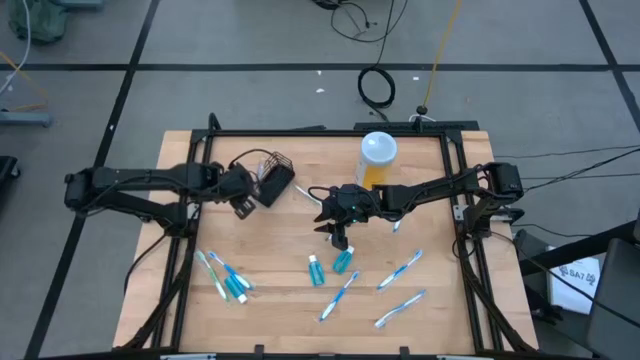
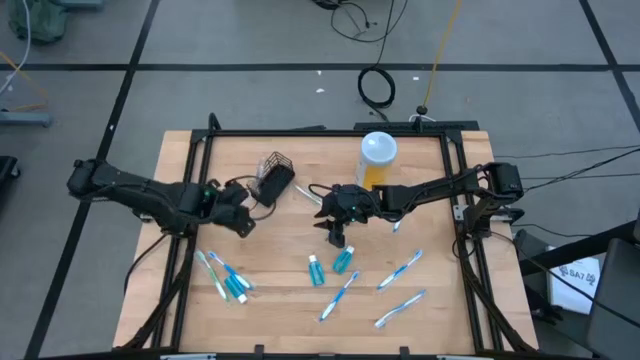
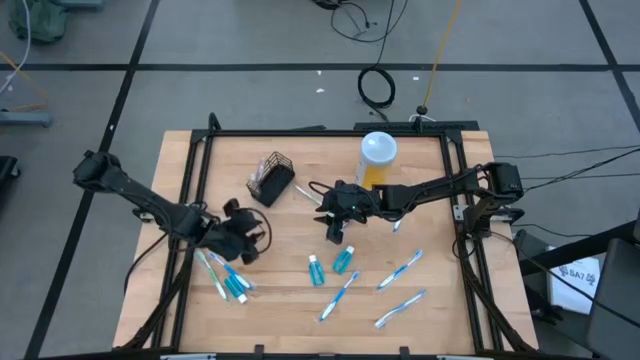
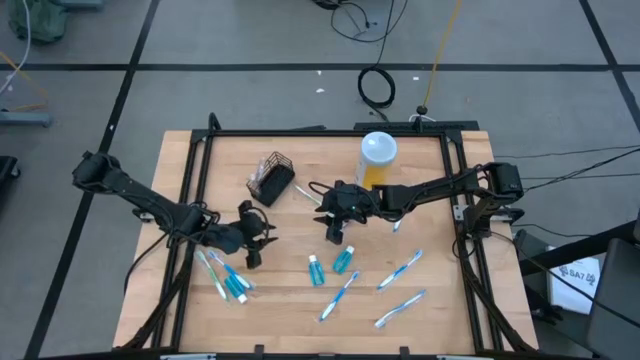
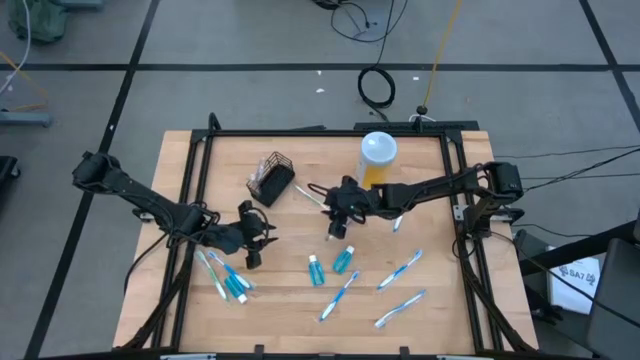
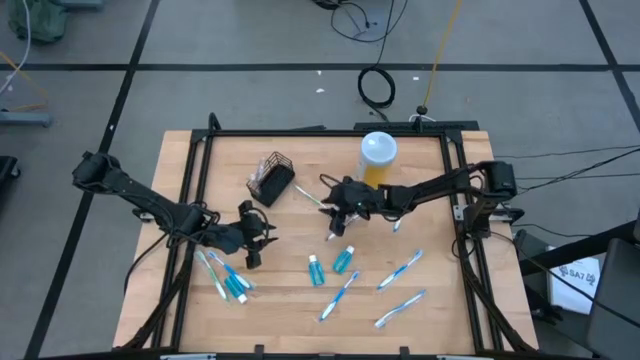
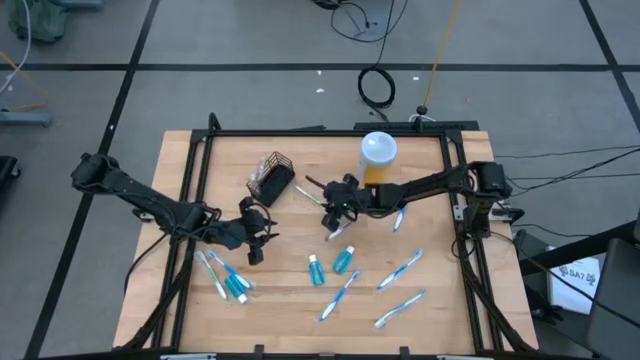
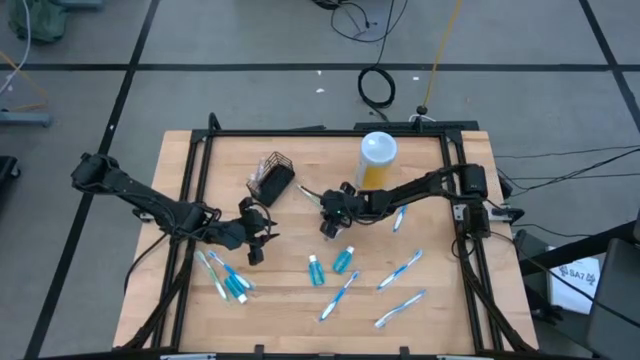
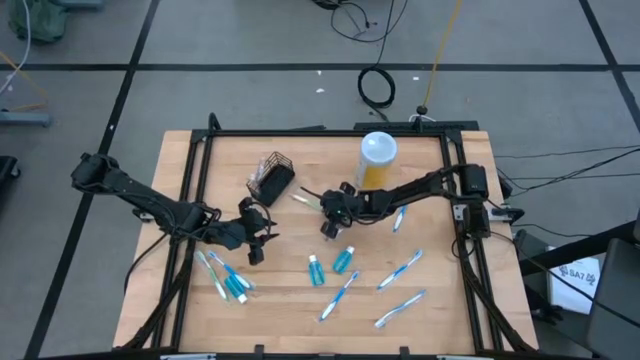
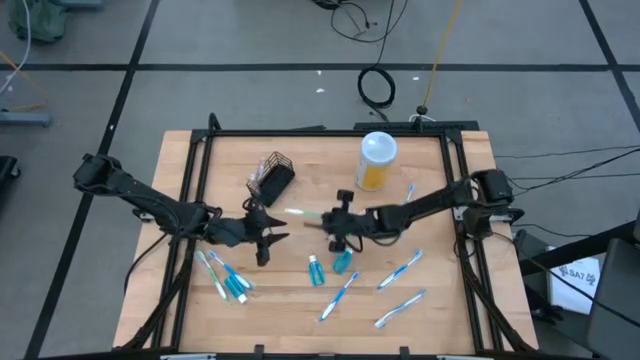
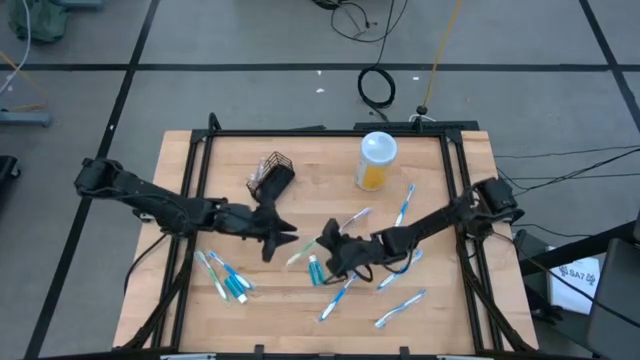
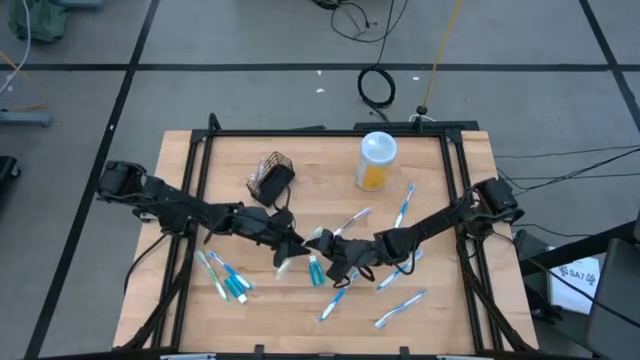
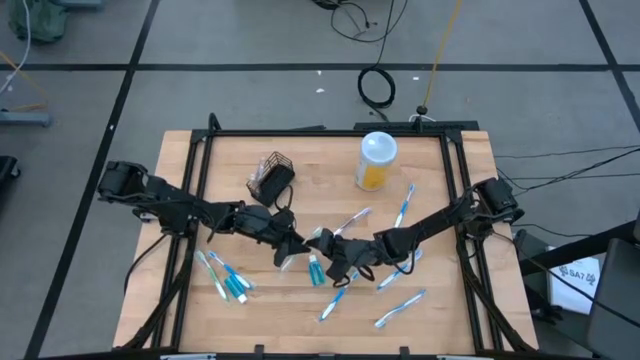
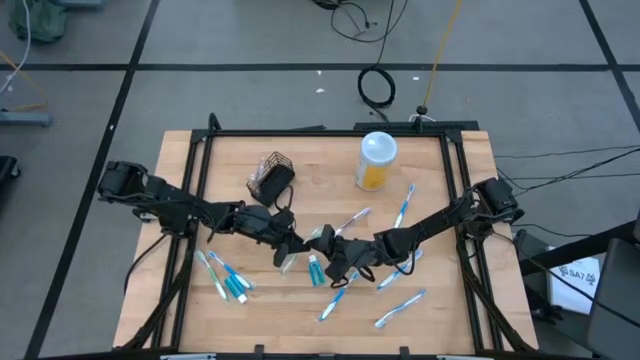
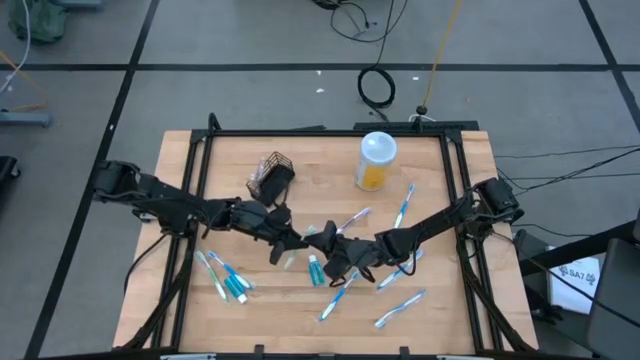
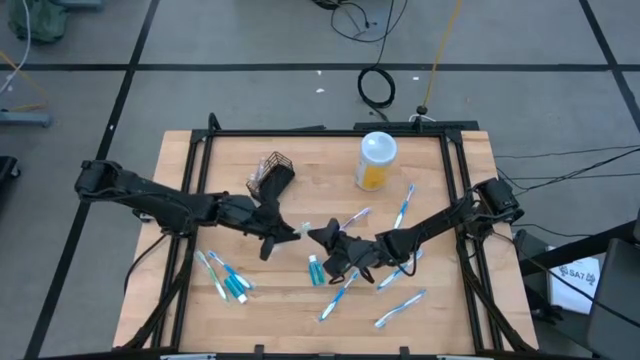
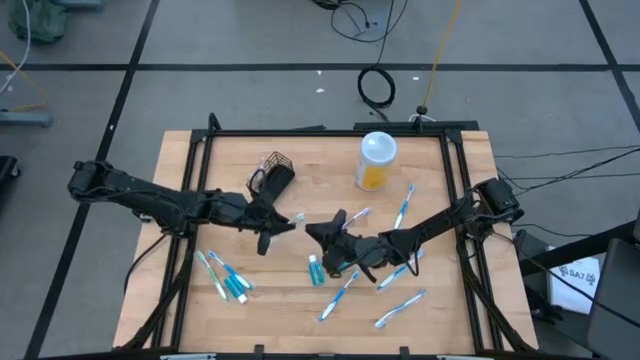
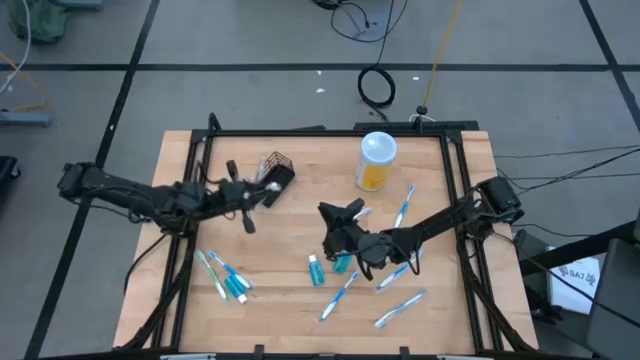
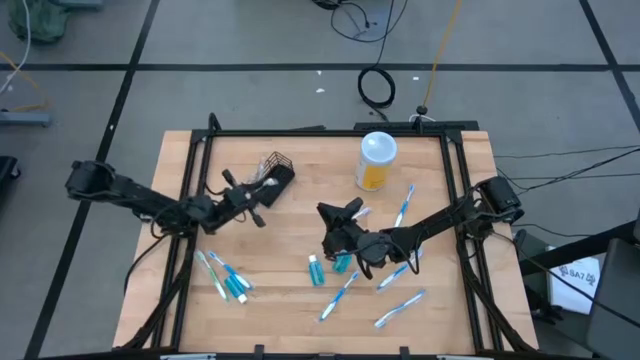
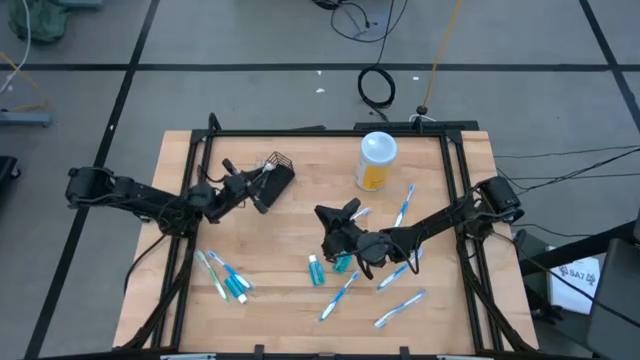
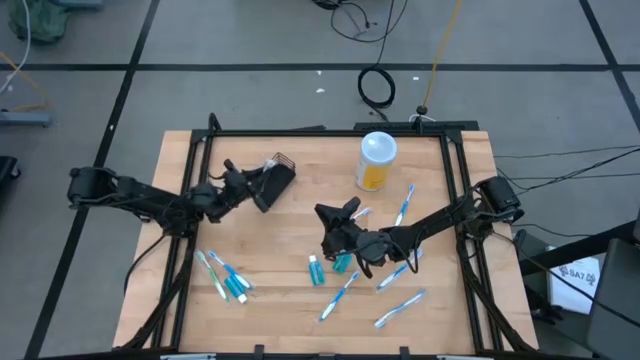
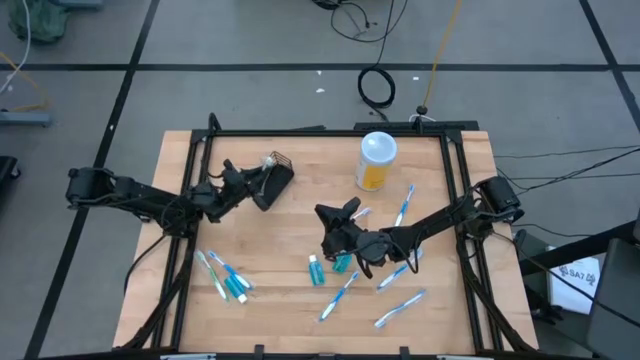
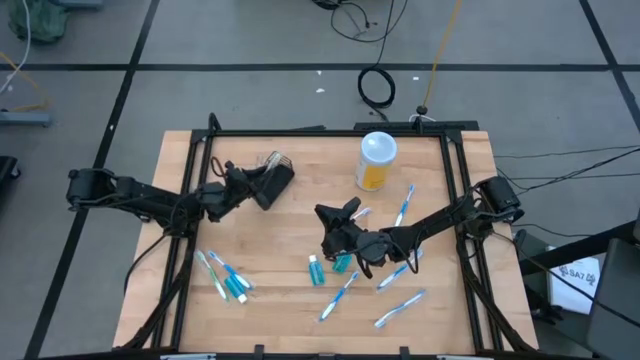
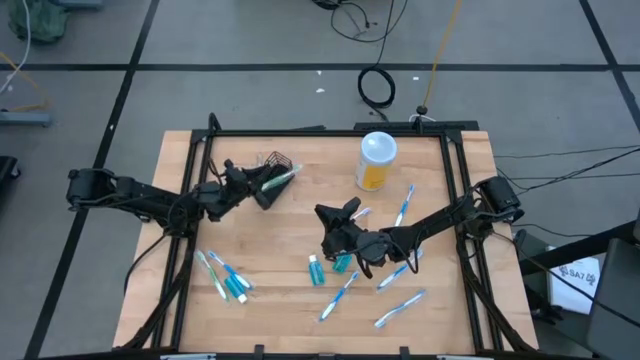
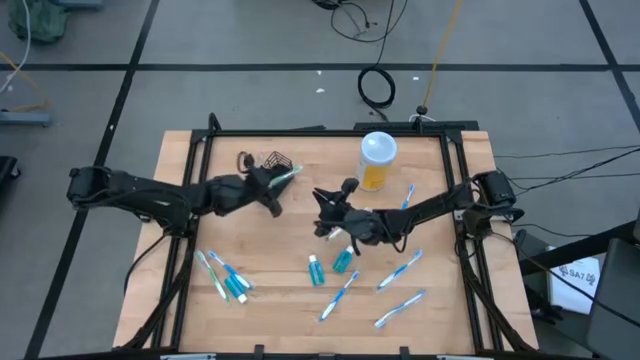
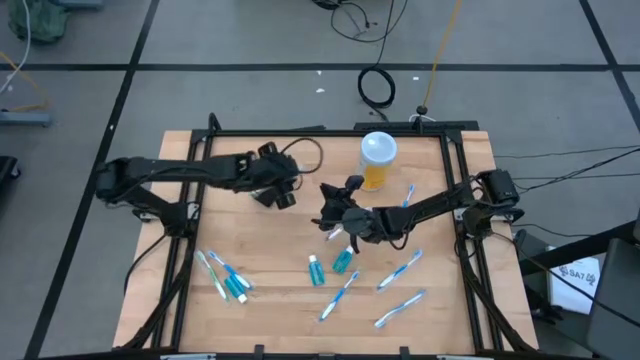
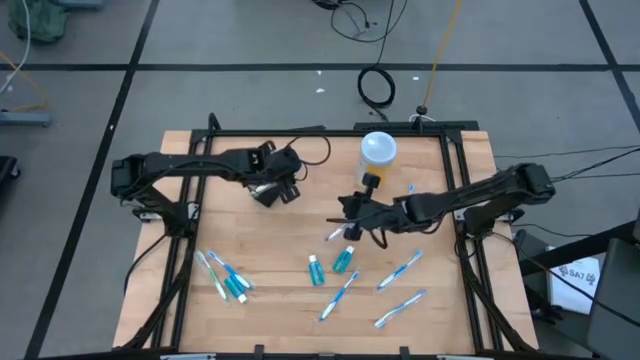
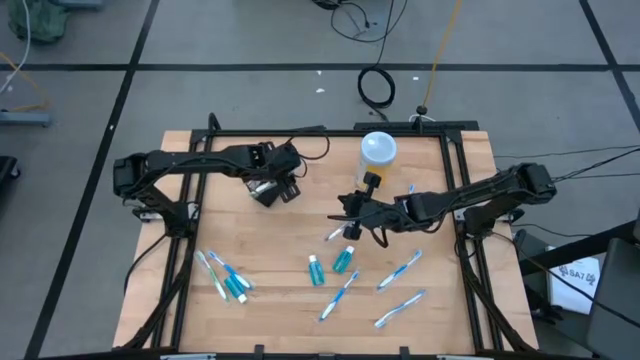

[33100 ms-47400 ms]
Task: Pick & Place toothbrushing station
Put the top right green toothbrush into the black wire organizer

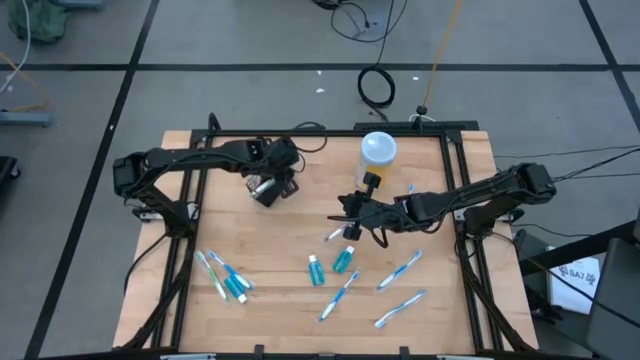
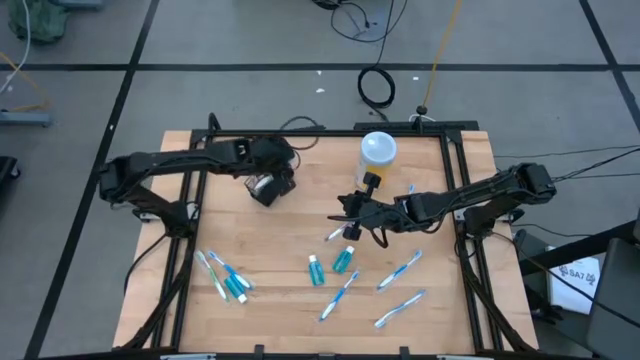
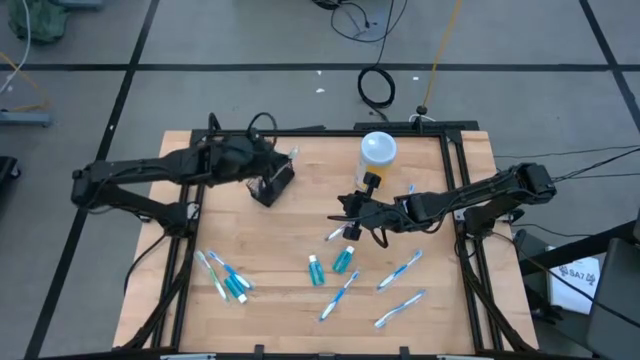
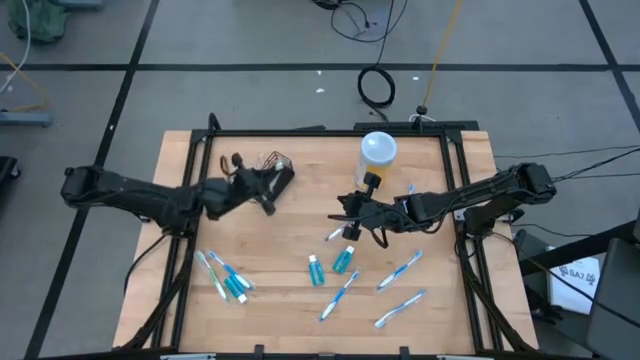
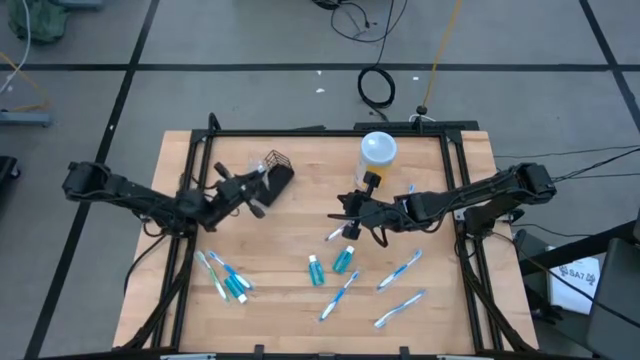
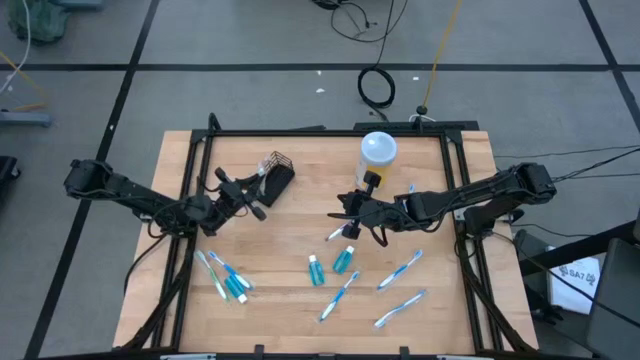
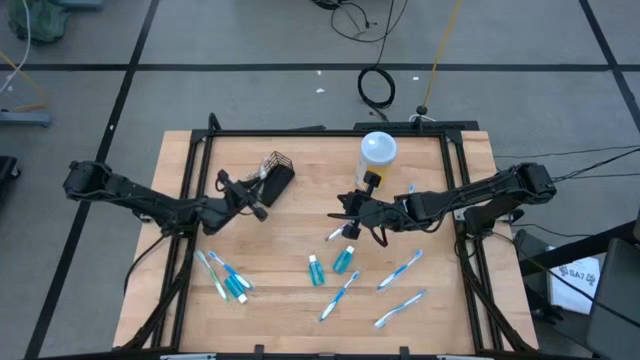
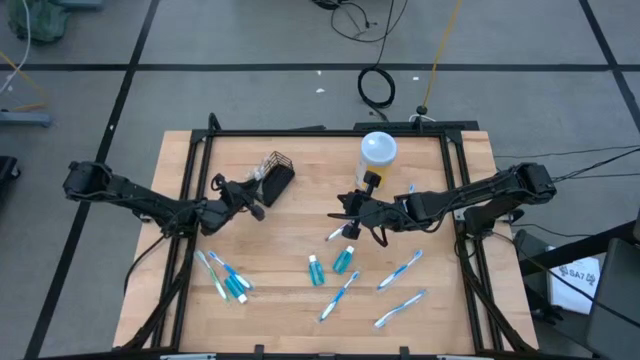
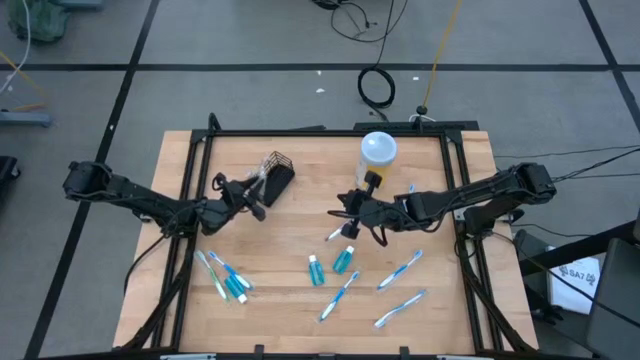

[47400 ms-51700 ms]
Put the top right green toothbrush into the black wire organizer

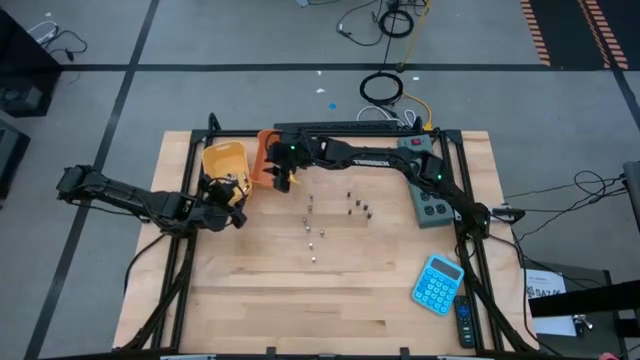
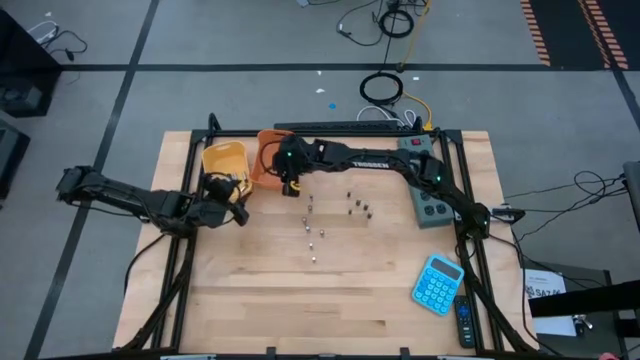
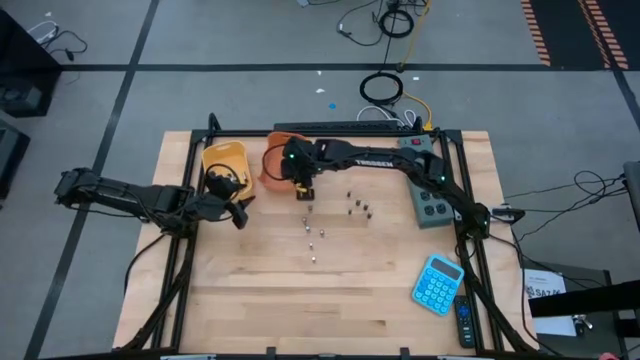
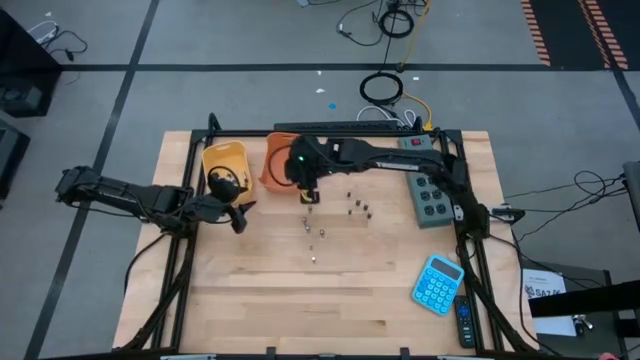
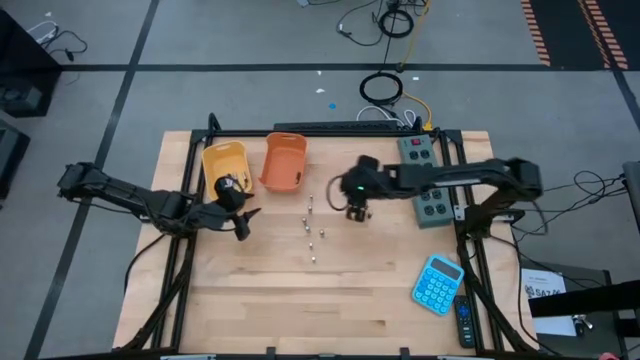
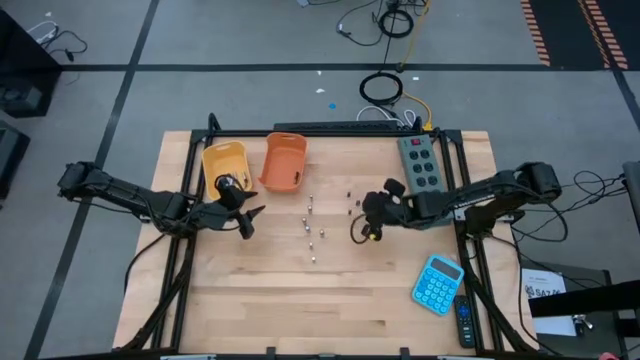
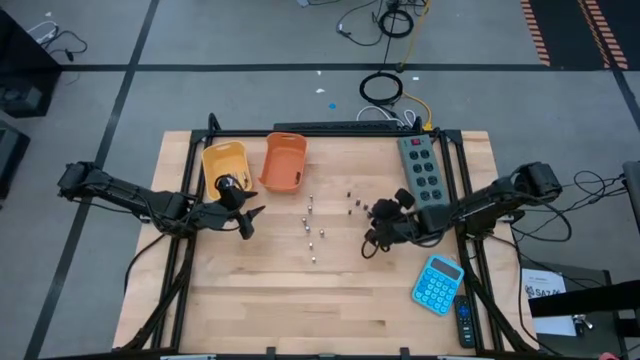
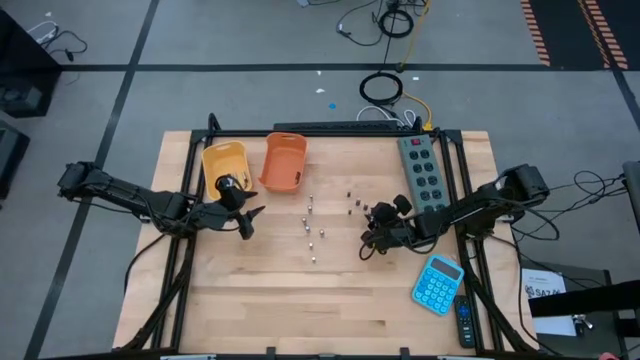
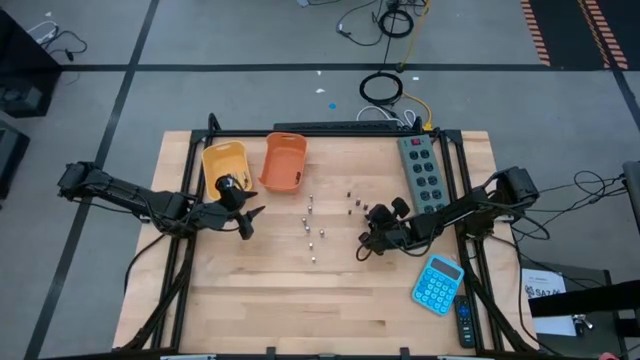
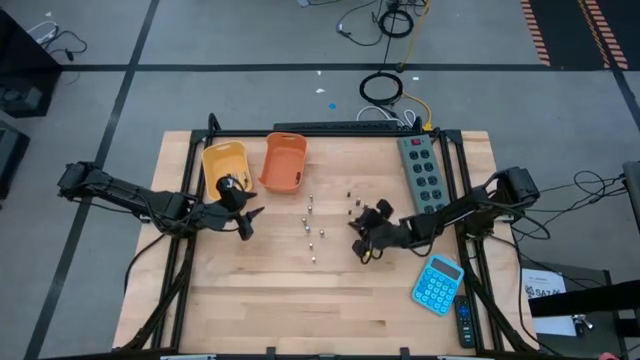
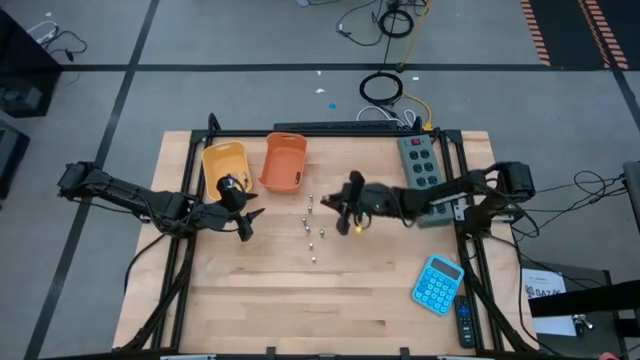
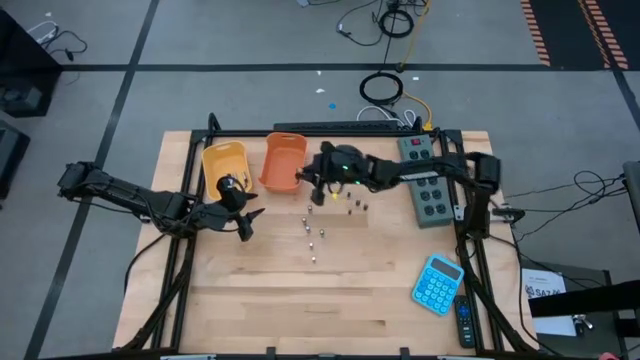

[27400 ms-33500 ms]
Task: Sort batteries
Put the black battery into the orange bin
